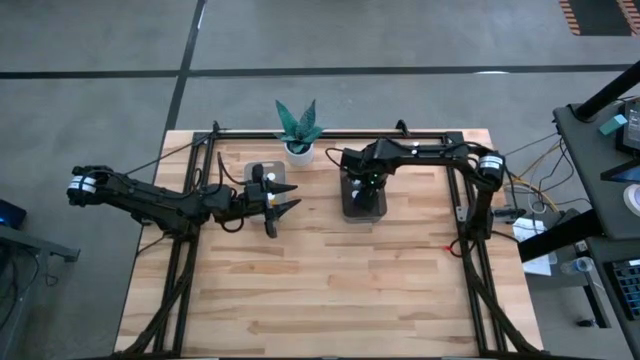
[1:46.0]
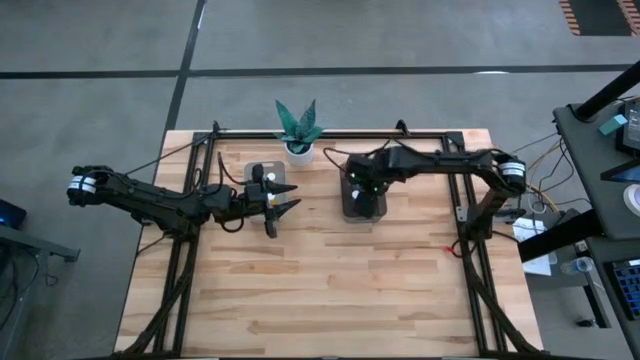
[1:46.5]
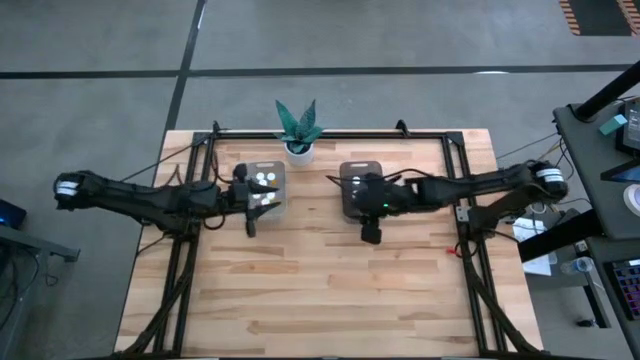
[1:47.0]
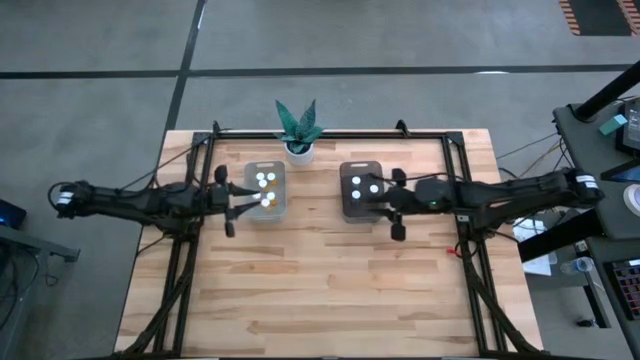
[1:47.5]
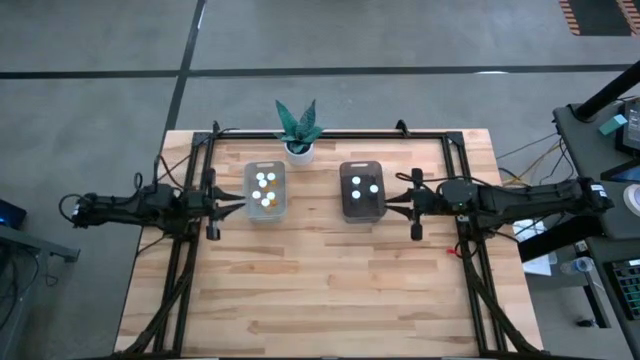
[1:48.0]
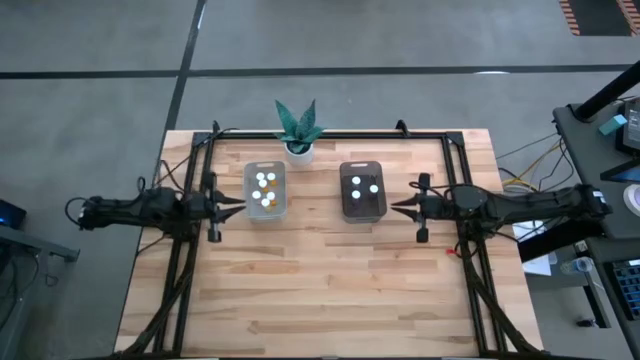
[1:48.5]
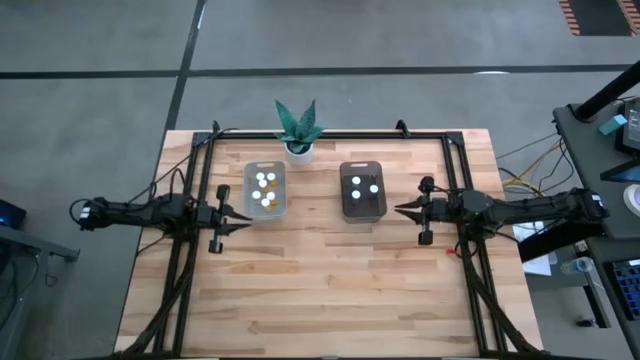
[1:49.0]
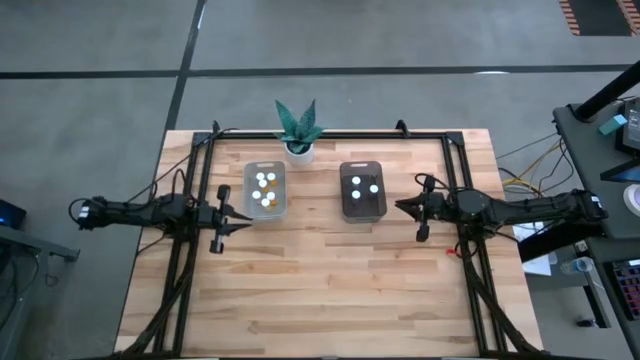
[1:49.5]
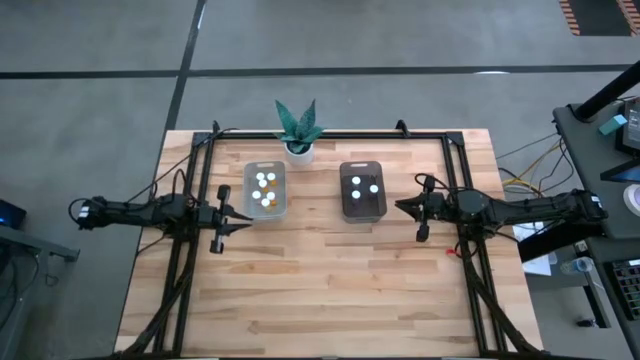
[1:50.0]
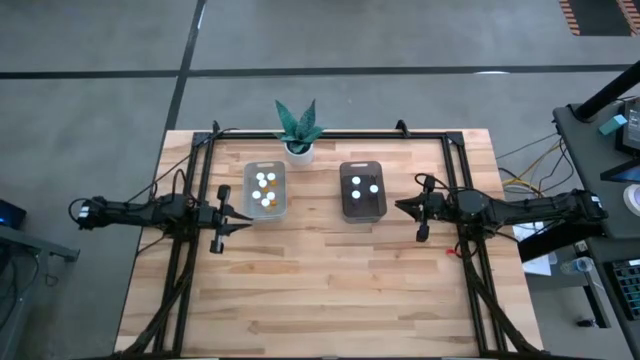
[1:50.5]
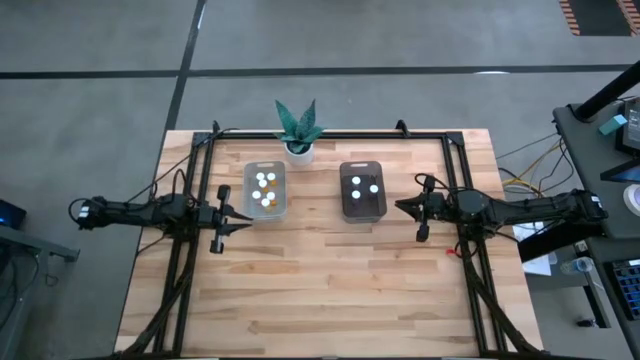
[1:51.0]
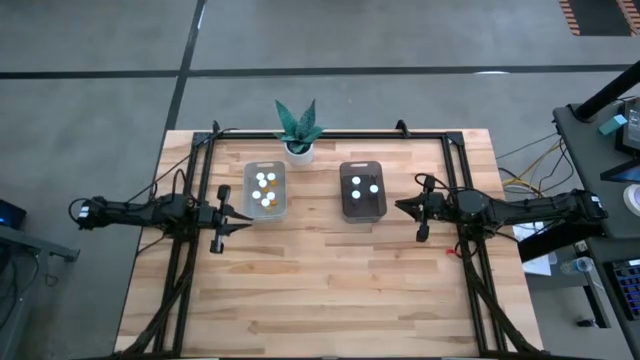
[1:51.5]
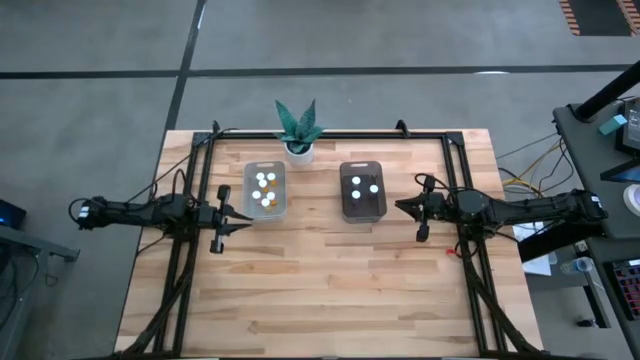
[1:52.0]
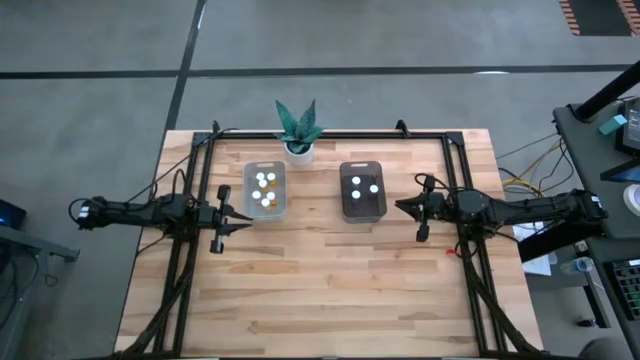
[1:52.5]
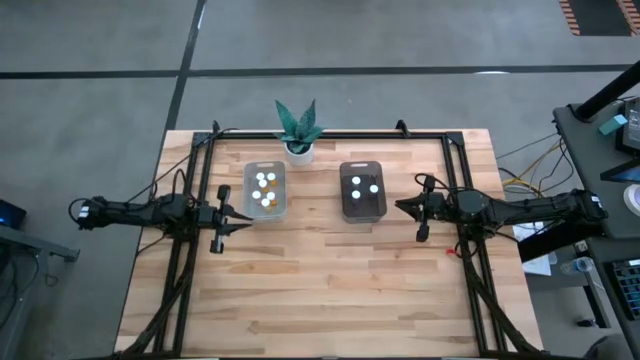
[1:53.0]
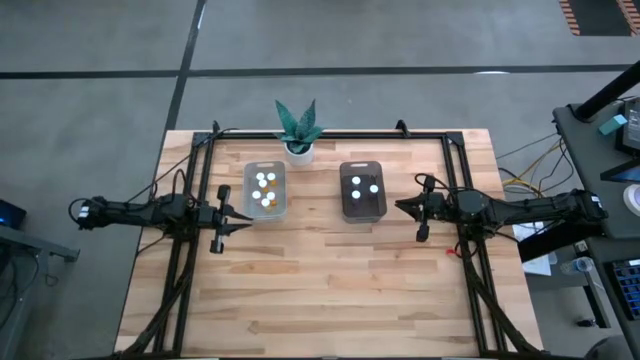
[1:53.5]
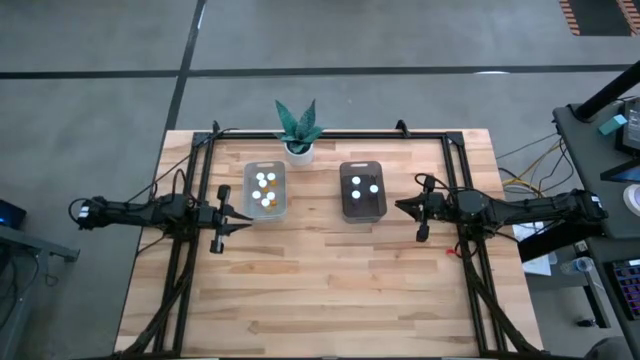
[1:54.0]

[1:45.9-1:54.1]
Task: Pick and place medicine bottles into bin by pill shape (circle, oval)
Return to Home Position

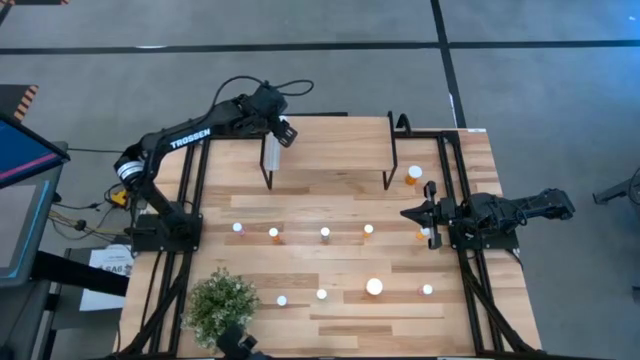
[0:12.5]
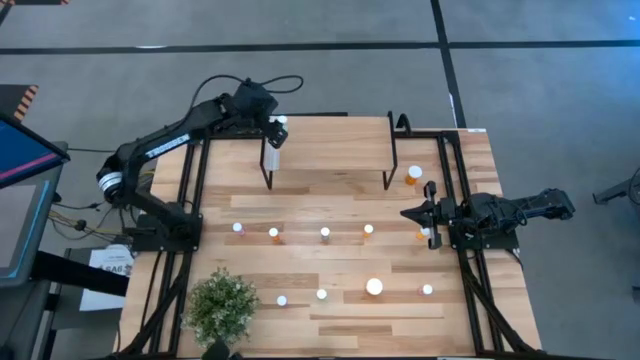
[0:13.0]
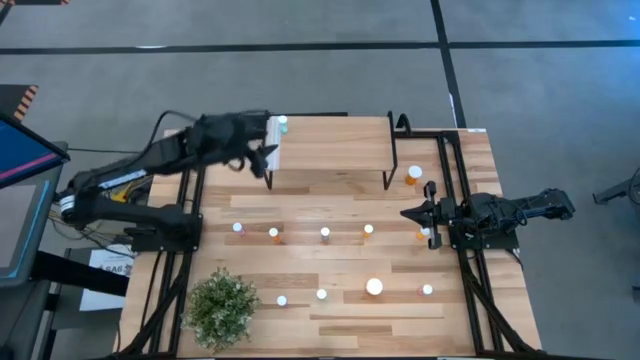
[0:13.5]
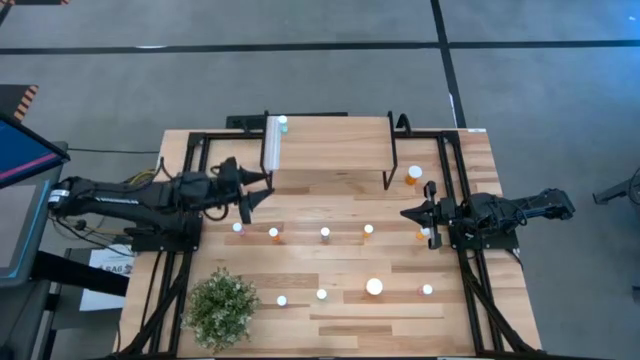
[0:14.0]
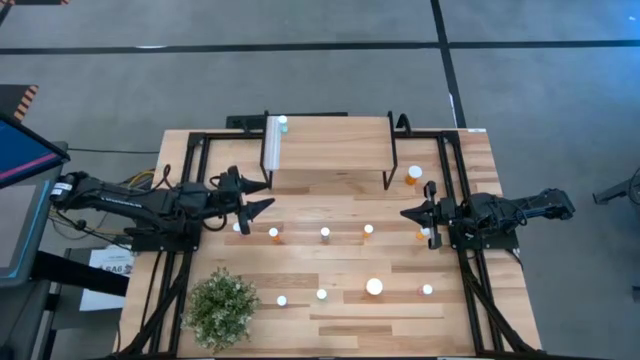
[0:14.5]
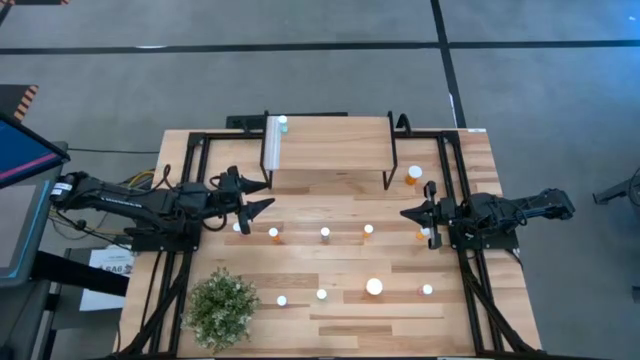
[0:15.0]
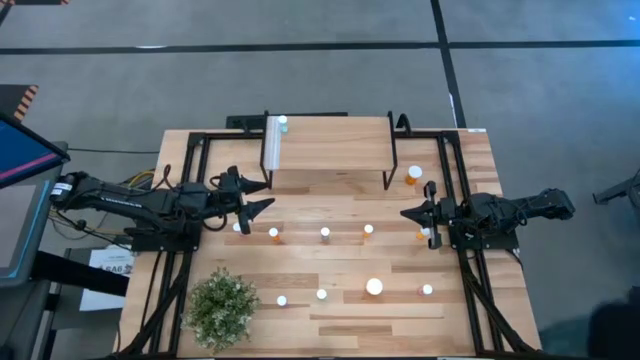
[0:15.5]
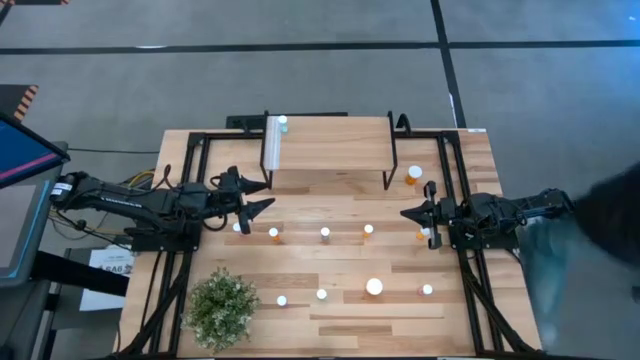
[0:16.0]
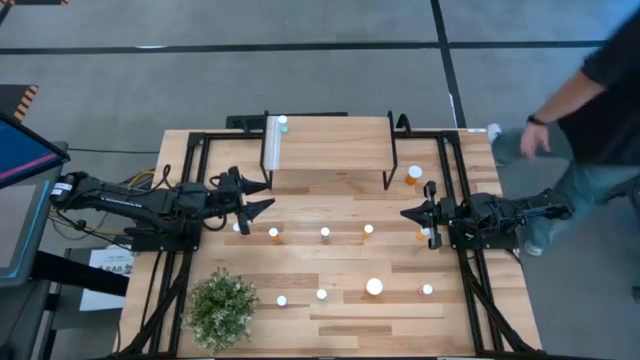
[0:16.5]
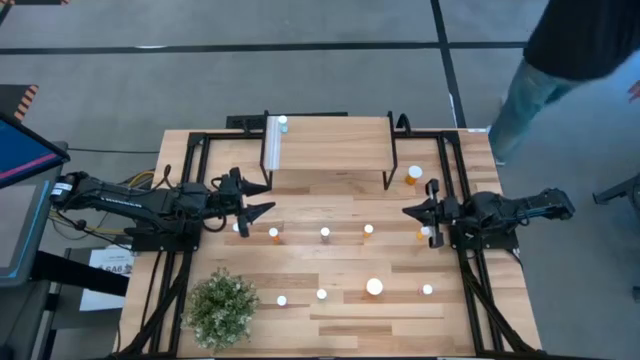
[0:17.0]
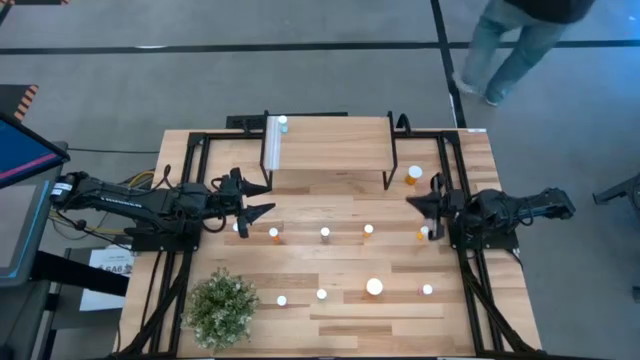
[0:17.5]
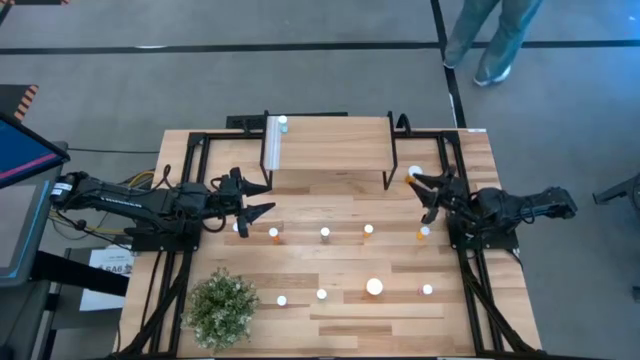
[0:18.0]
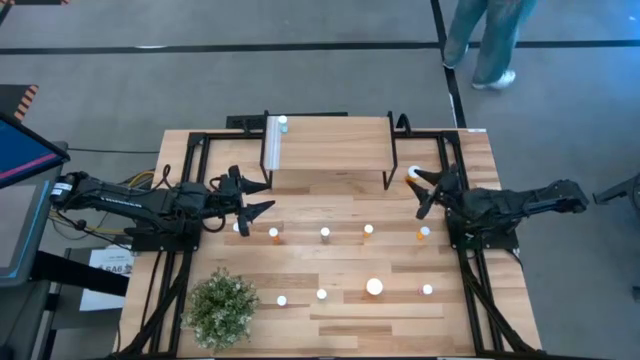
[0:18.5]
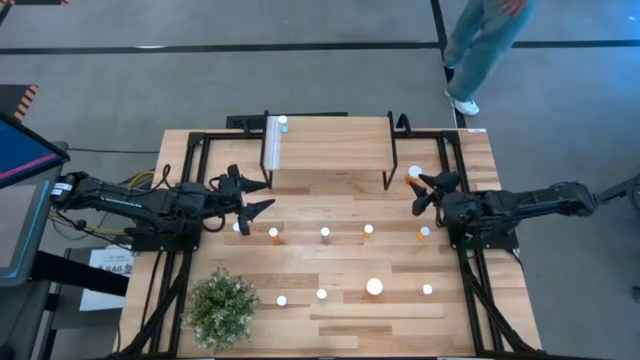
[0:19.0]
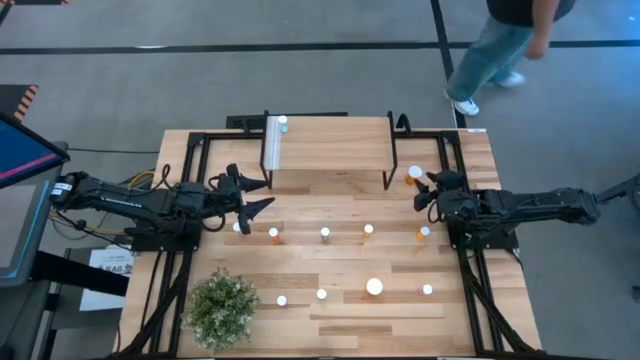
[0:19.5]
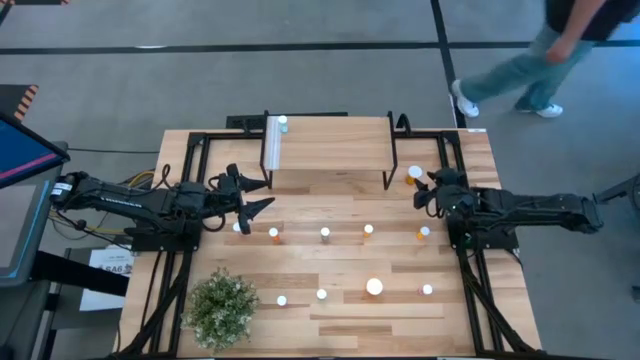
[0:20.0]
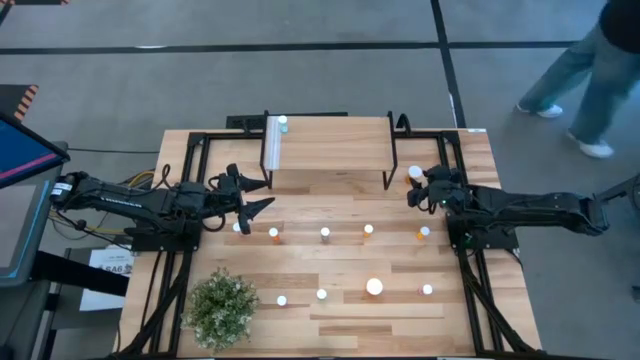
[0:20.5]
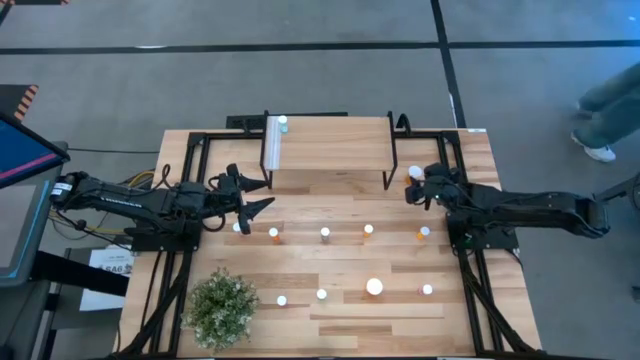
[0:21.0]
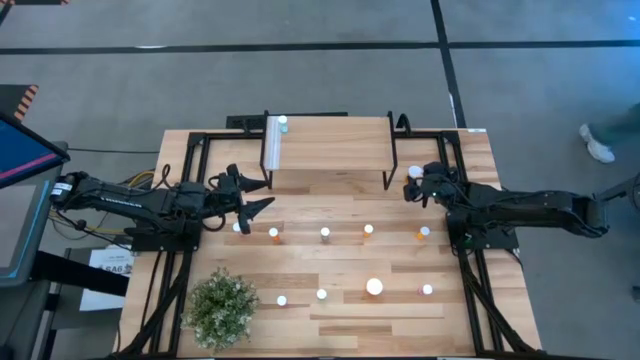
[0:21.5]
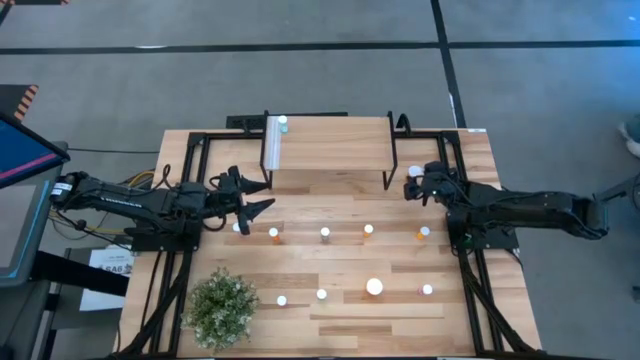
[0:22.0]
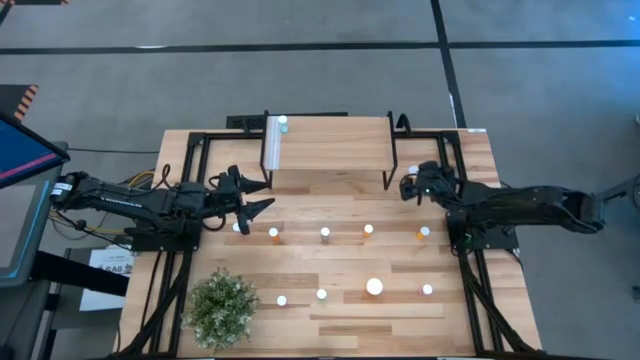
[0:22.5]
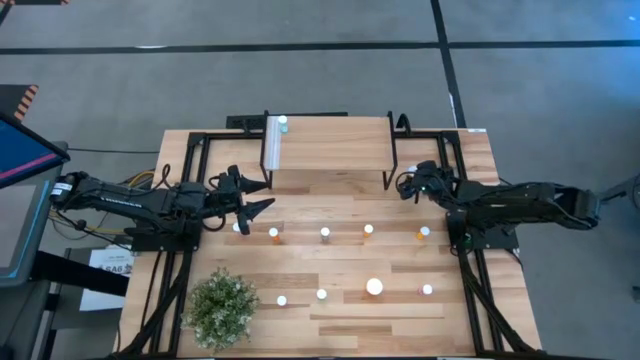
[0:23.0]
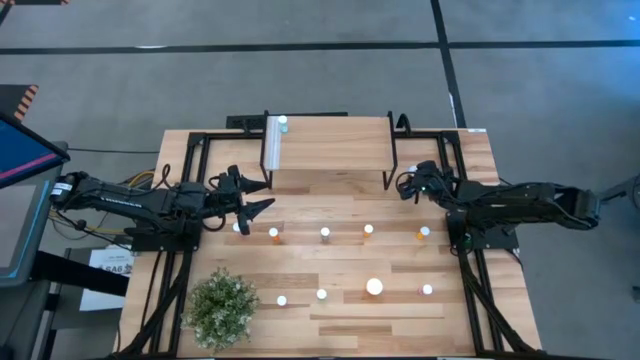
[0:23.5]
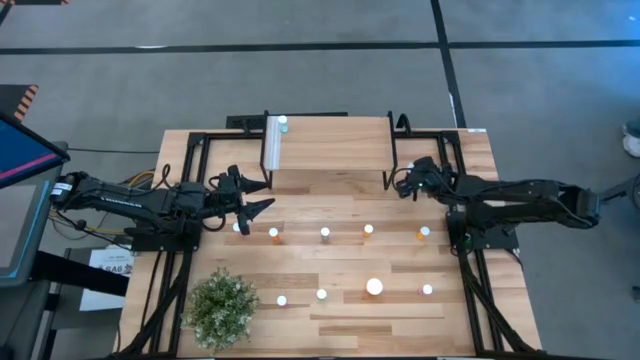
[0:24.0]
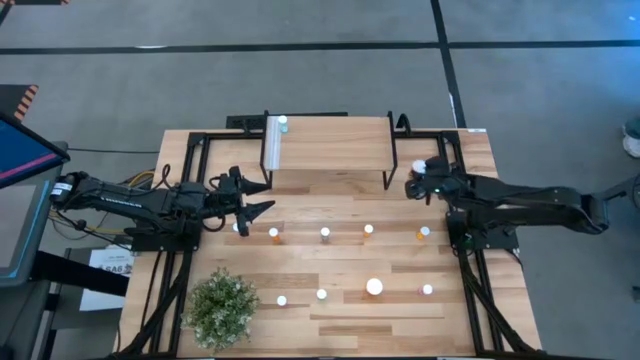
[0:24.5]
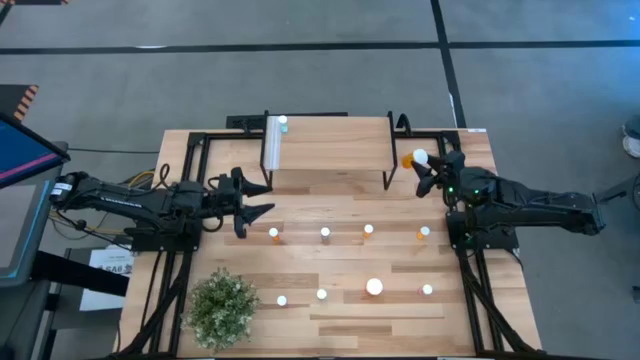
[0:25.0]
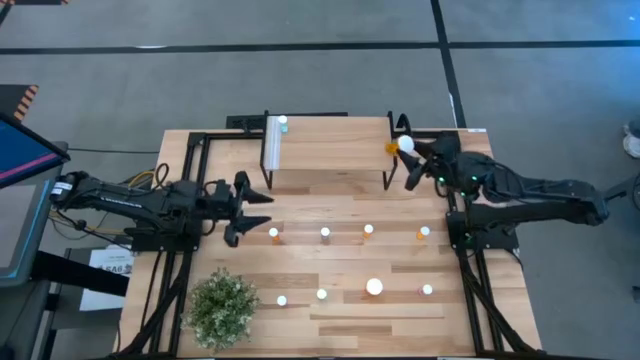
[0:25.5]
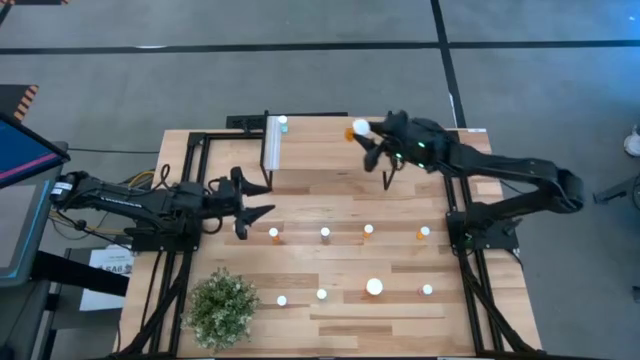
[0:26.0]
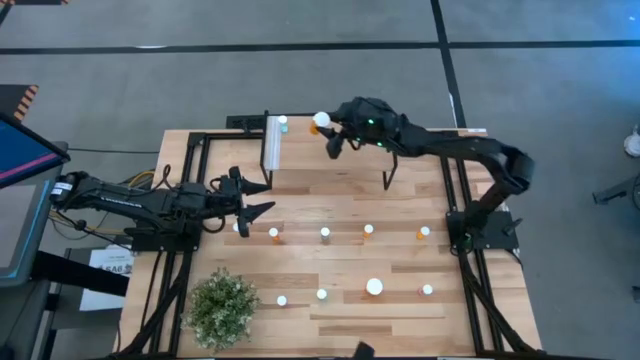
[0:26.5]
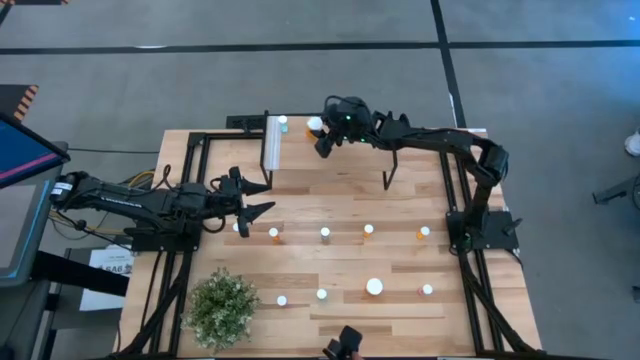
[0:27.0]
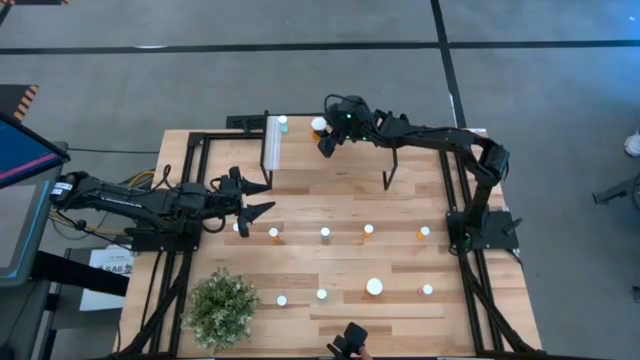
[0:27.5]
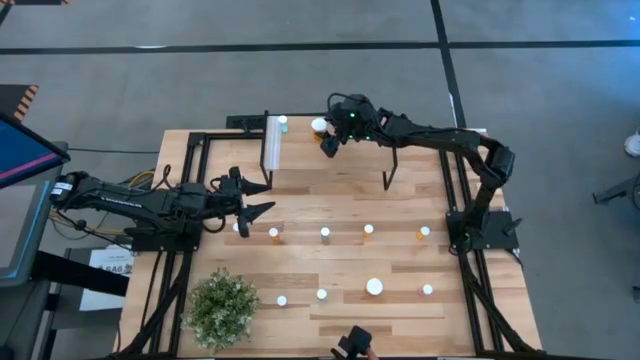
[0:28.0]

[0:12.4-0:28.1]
Task: Pick and place medicine bottles onto shelf by color
Put the top large orange pill bottle on the shelf
